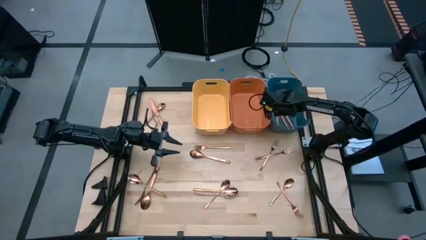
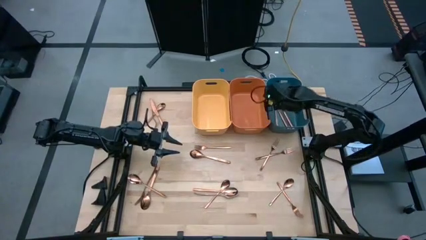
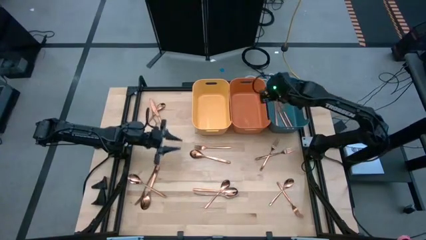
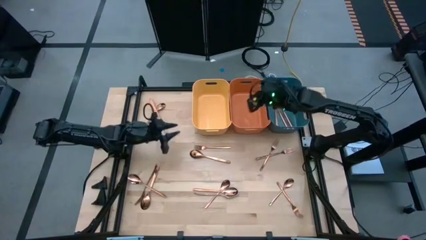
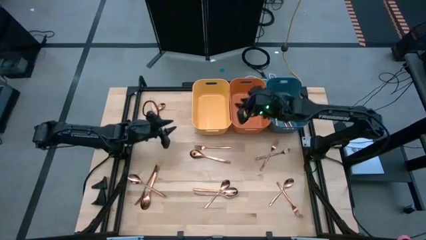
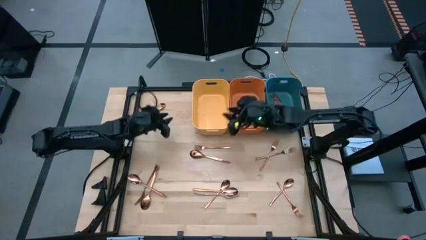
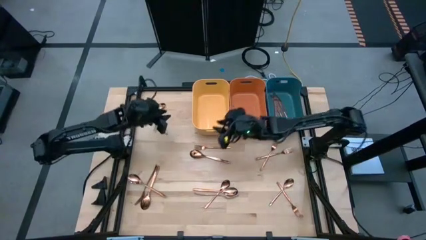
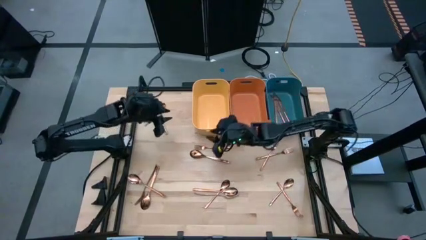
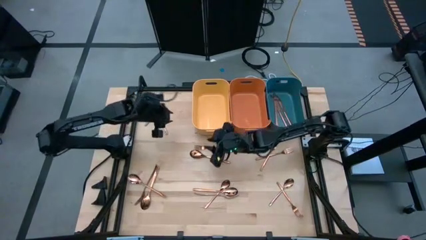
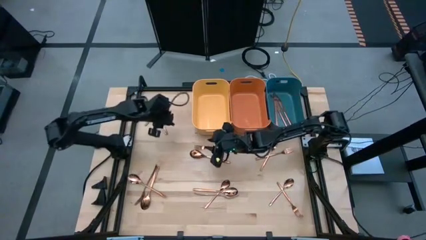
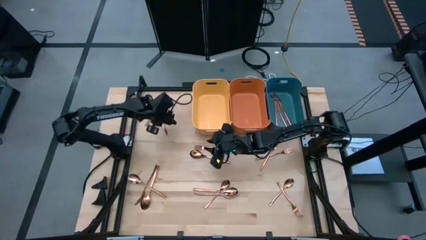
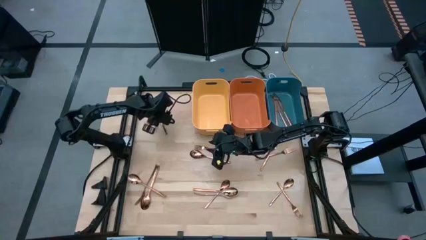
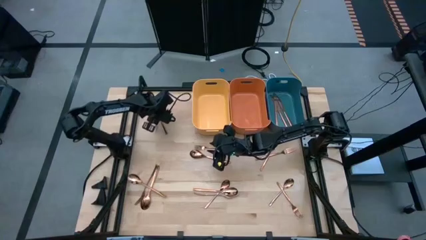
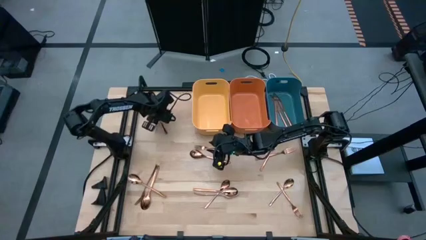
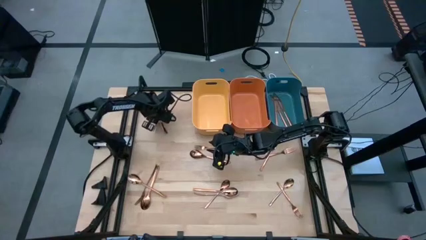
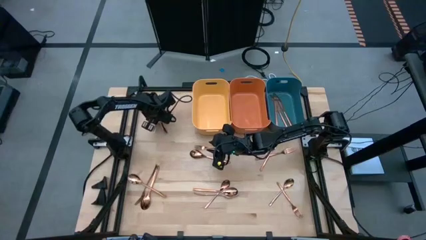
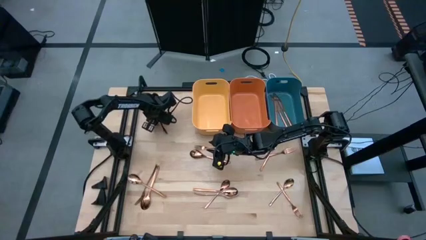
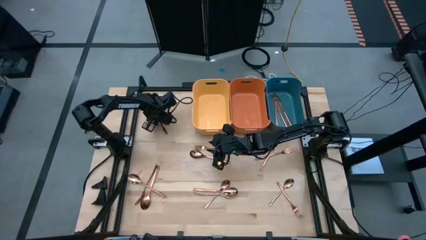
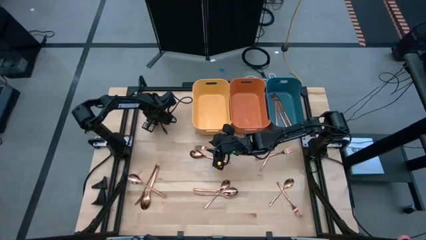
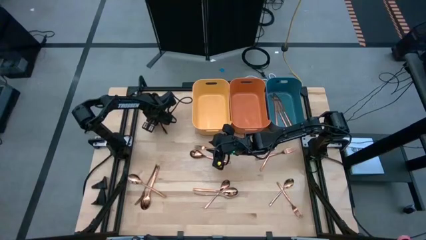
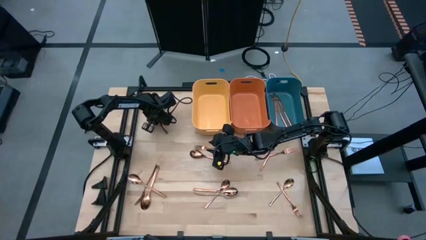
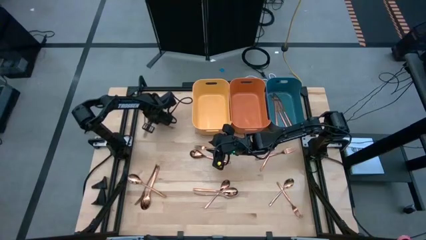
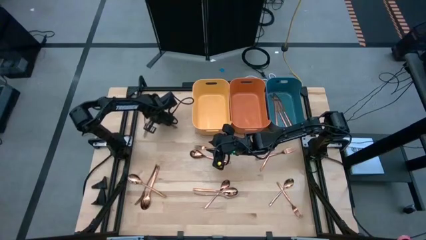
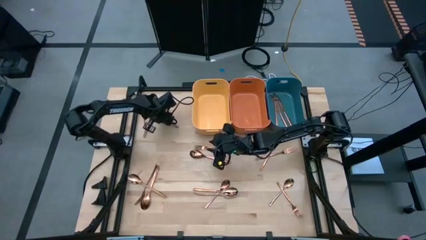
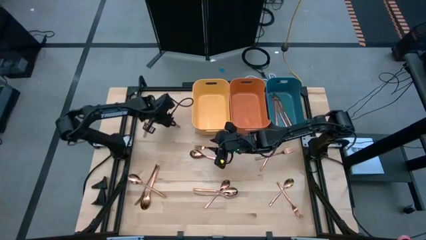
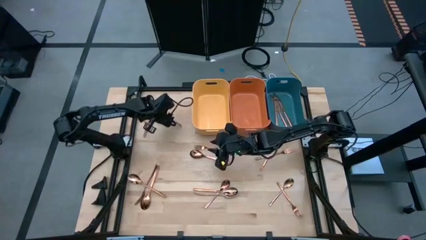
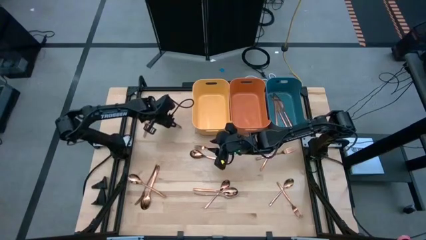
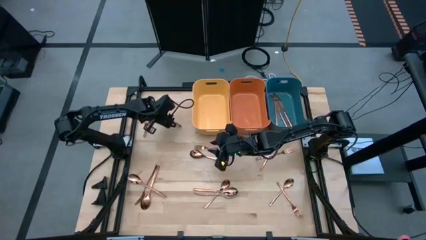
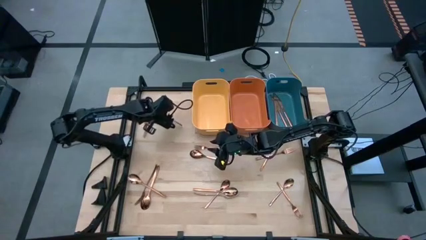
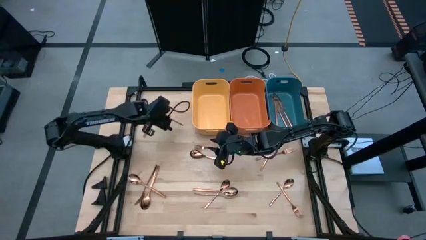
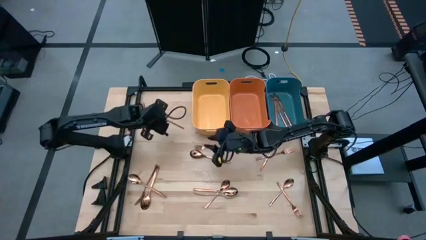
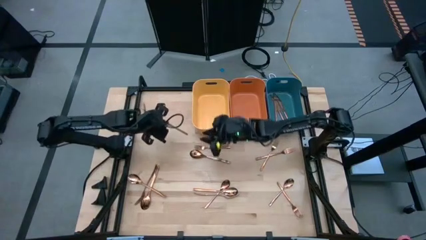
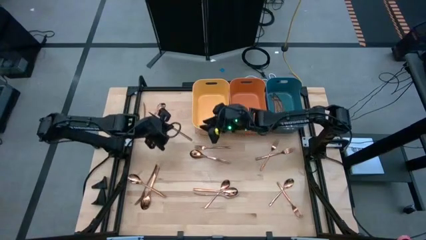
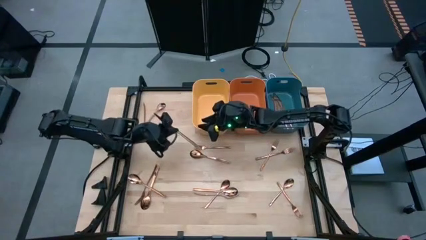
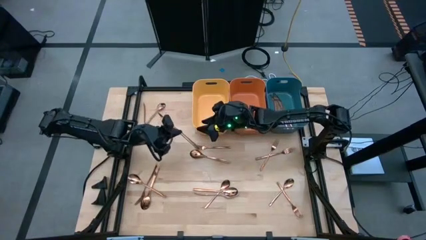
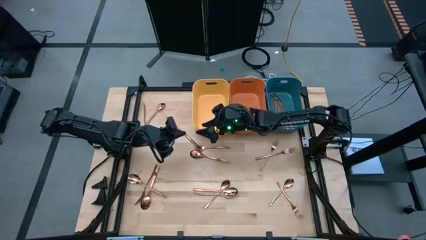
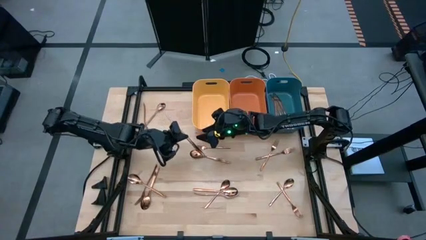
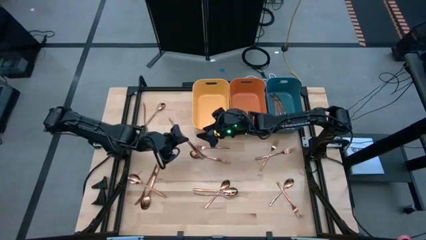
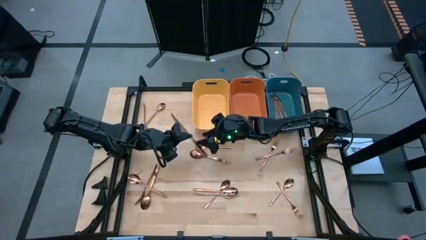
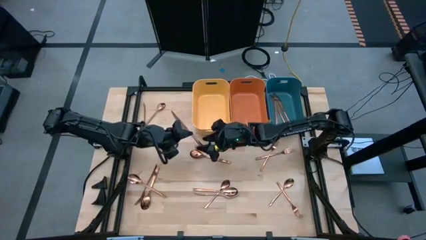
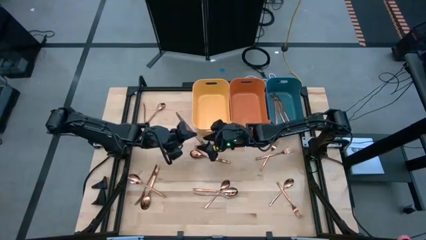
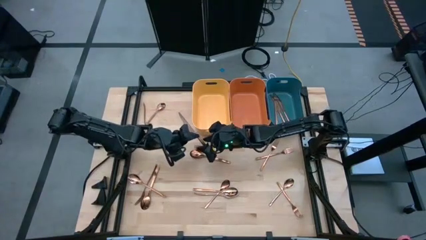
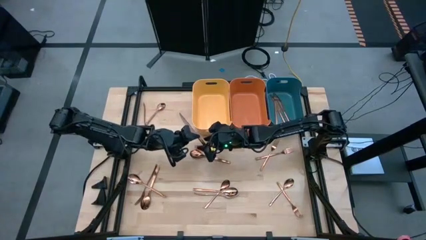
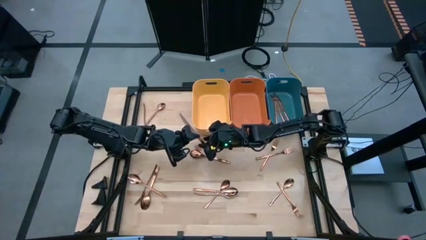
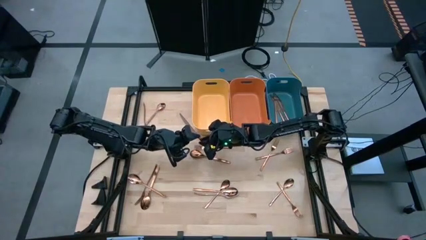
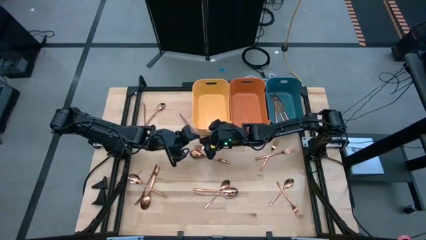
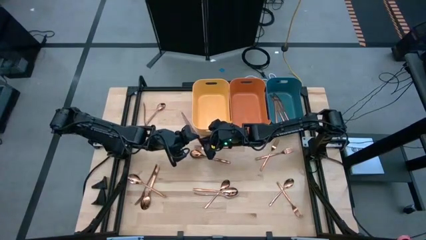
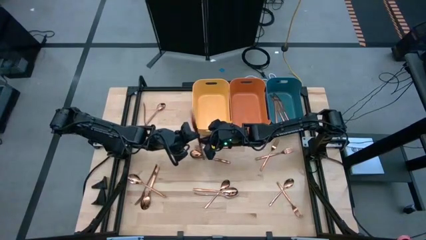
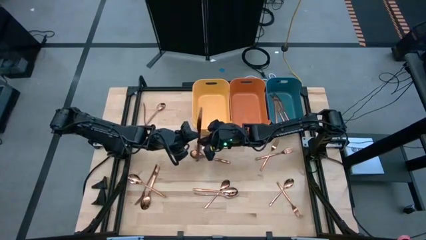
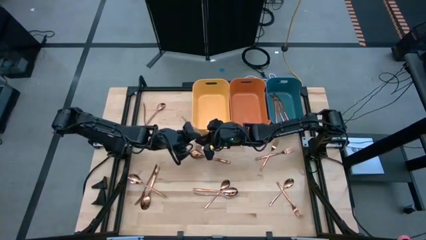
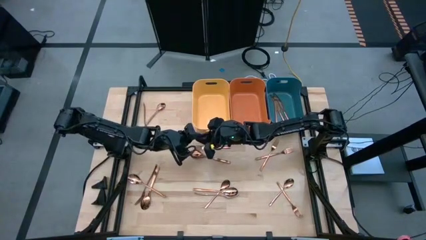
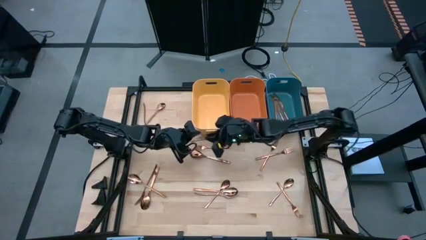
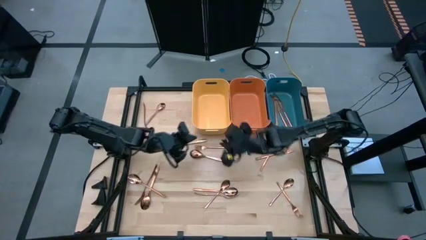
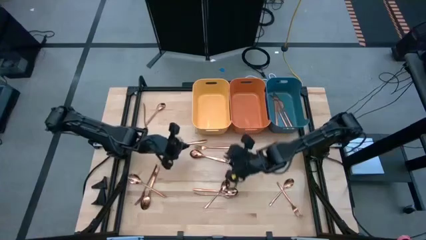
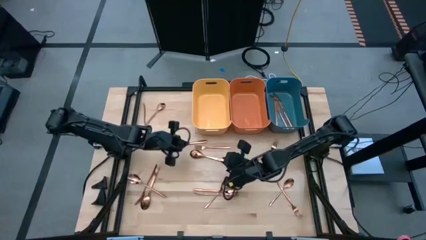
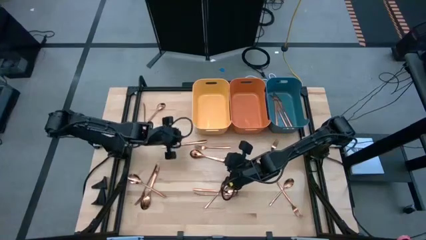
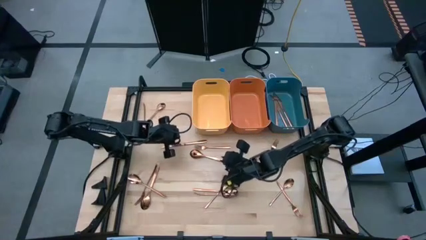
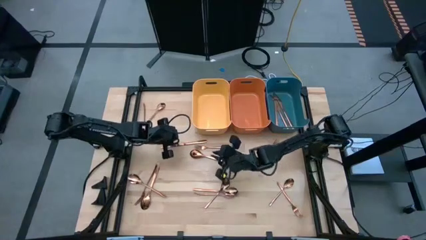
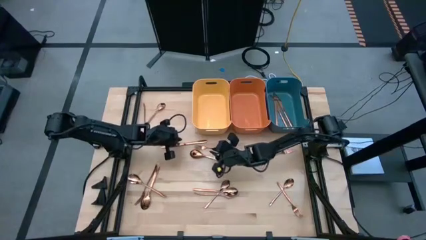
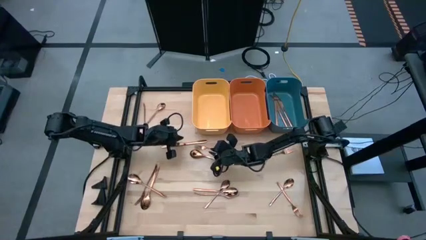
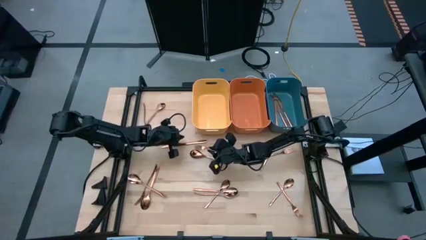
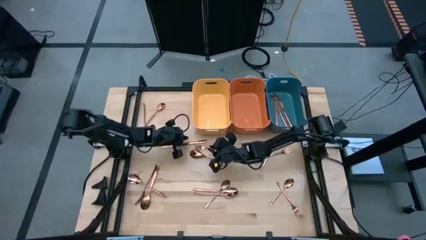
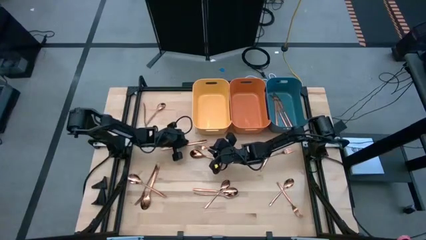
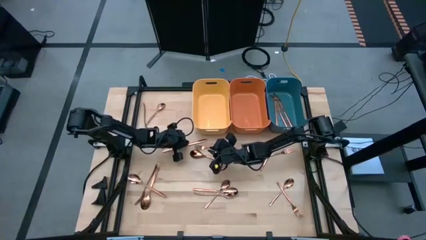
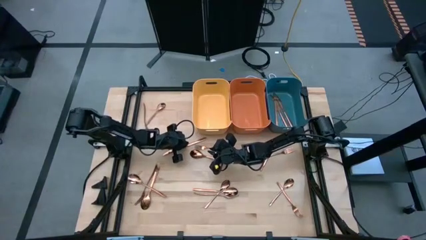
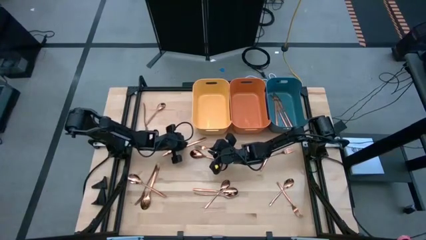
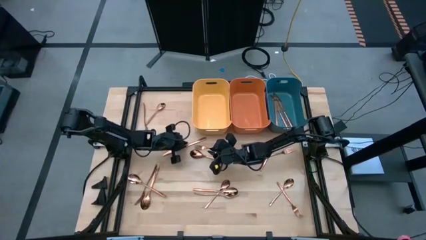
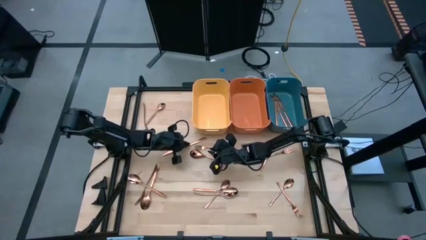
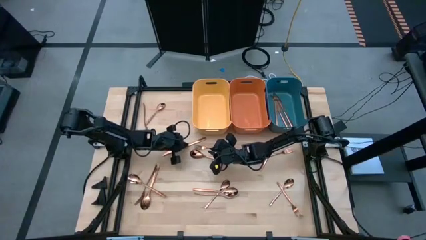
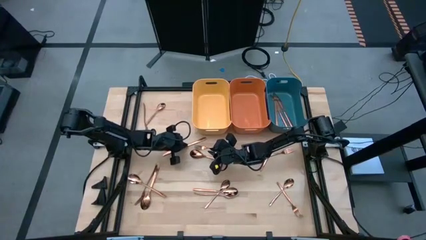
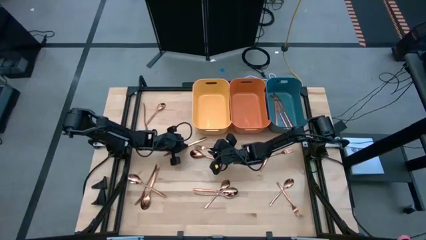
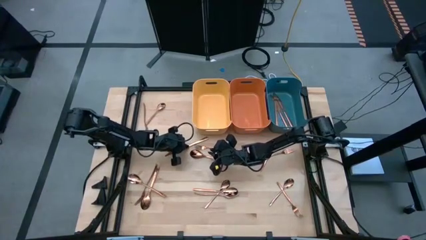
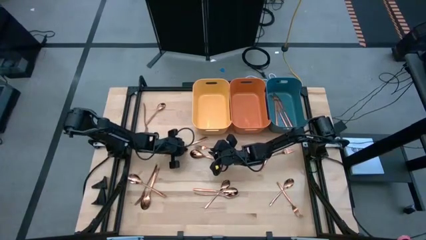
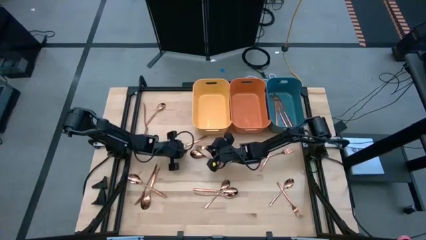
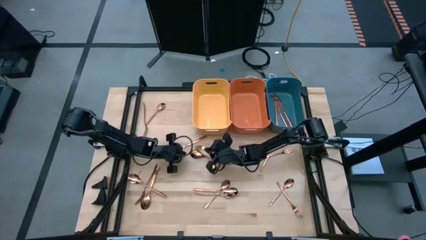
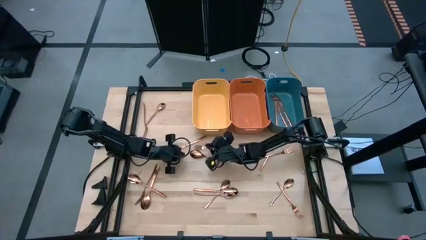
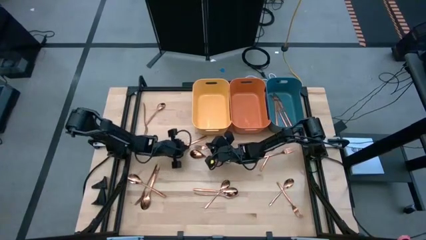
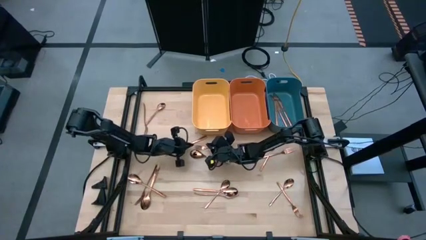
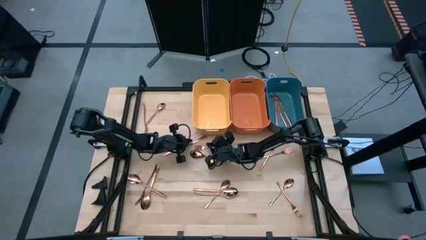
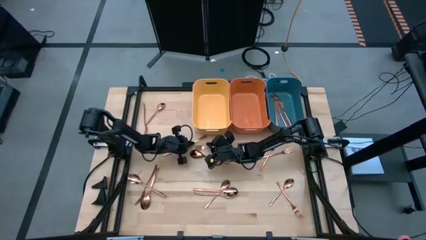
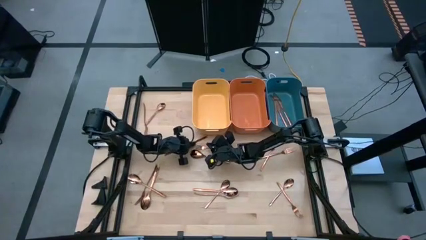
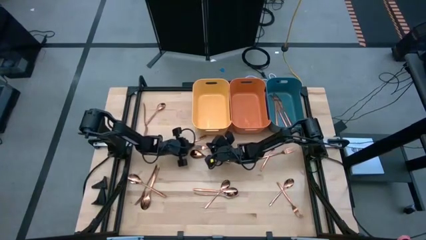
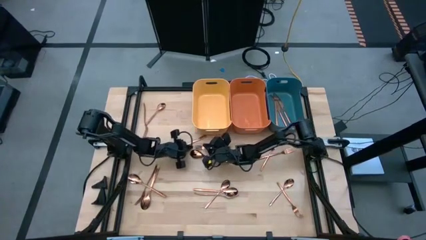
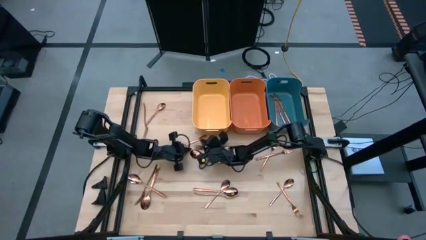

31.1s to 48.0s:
Task: Sort silverware
Put the copper knife into the blue bin
